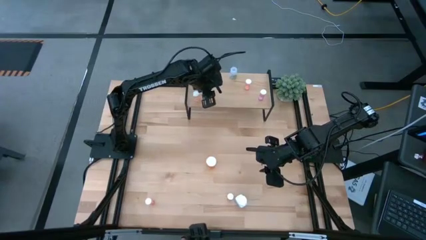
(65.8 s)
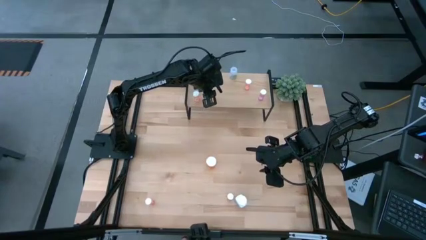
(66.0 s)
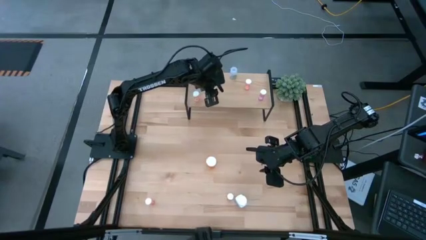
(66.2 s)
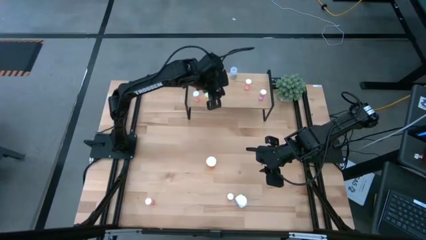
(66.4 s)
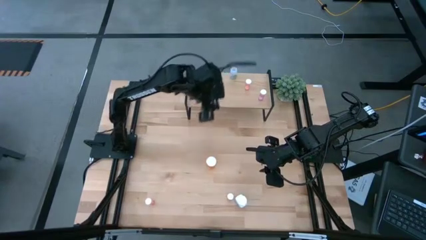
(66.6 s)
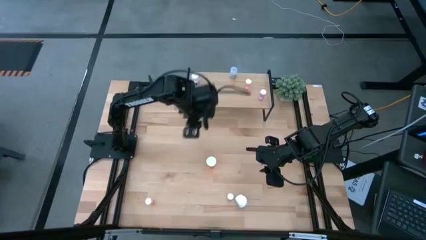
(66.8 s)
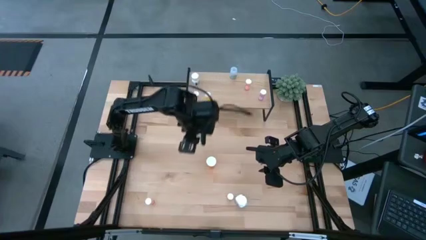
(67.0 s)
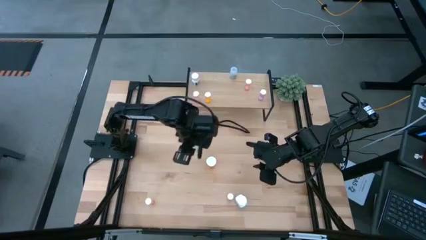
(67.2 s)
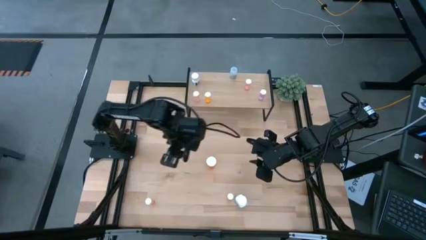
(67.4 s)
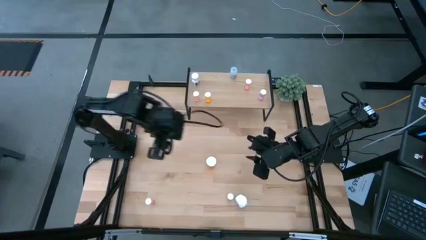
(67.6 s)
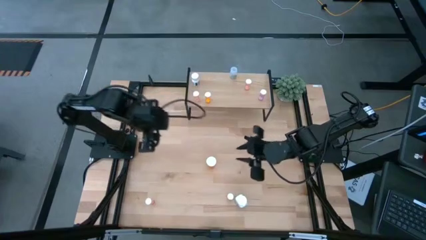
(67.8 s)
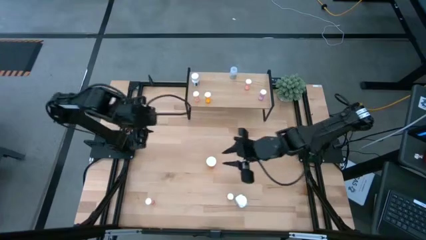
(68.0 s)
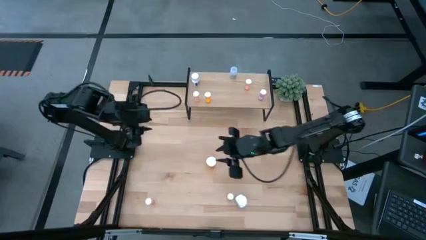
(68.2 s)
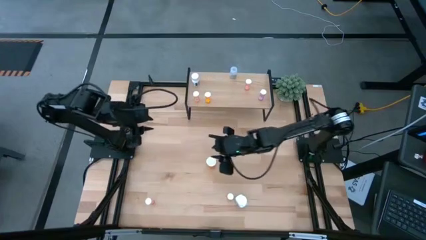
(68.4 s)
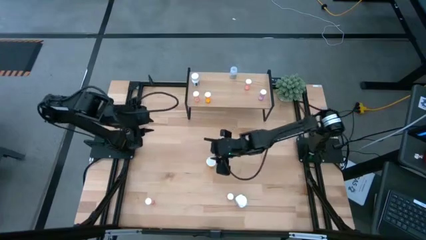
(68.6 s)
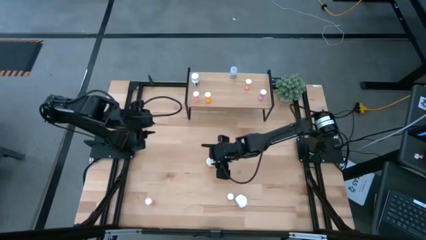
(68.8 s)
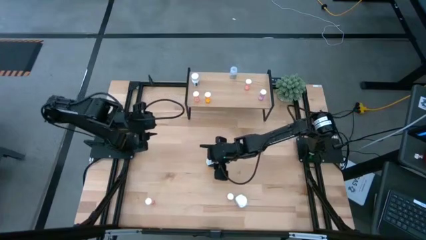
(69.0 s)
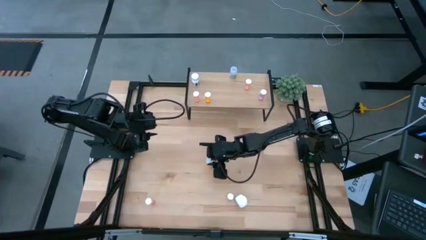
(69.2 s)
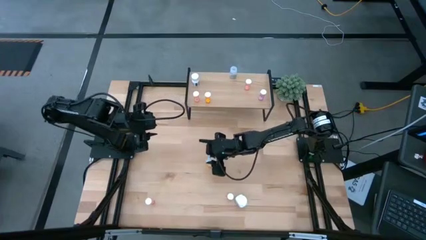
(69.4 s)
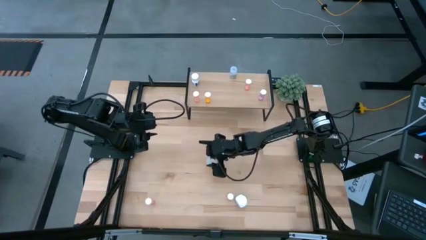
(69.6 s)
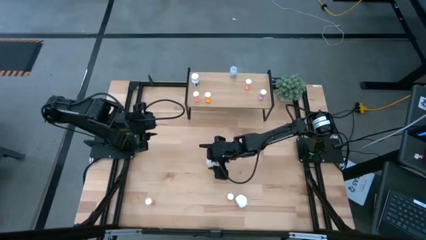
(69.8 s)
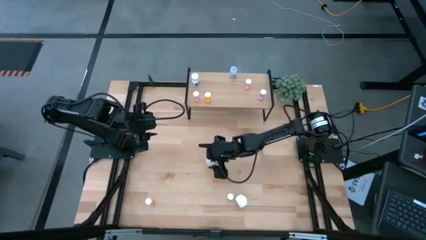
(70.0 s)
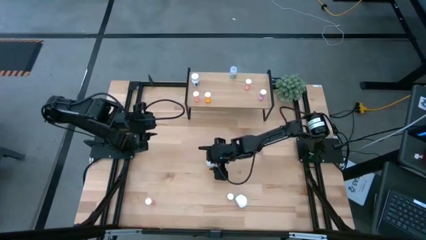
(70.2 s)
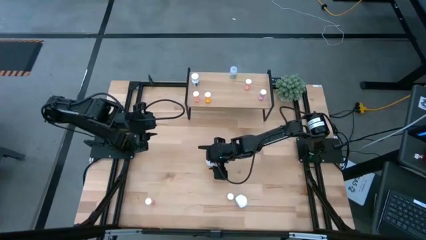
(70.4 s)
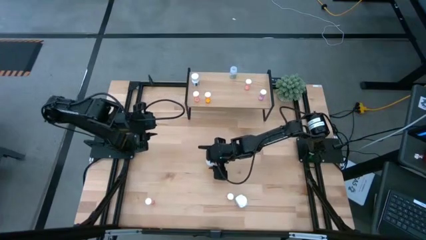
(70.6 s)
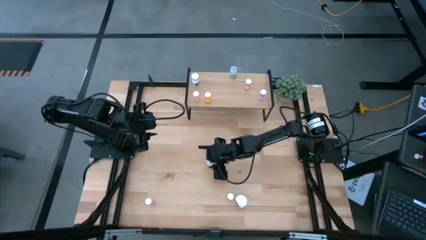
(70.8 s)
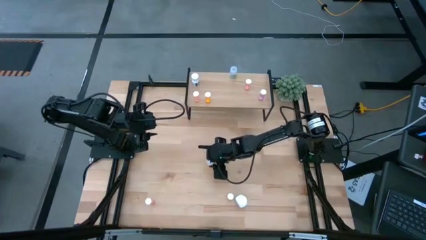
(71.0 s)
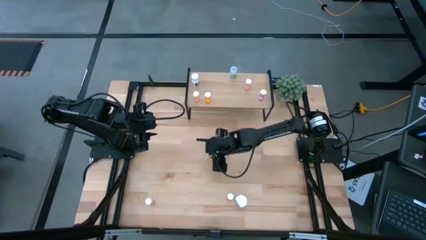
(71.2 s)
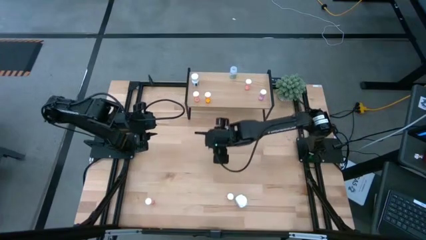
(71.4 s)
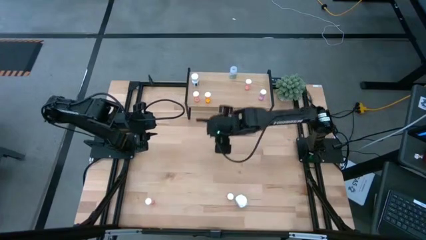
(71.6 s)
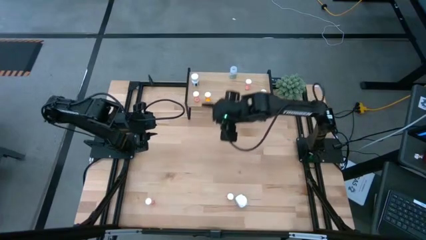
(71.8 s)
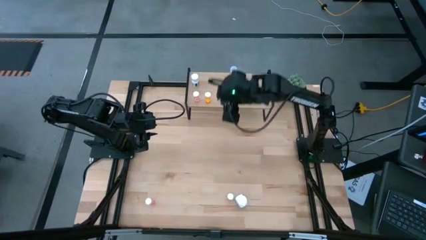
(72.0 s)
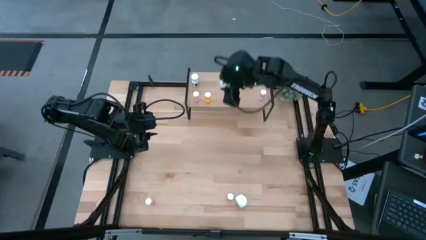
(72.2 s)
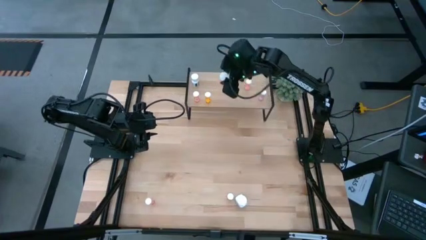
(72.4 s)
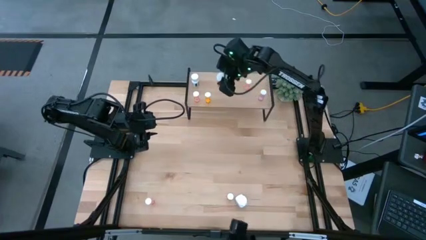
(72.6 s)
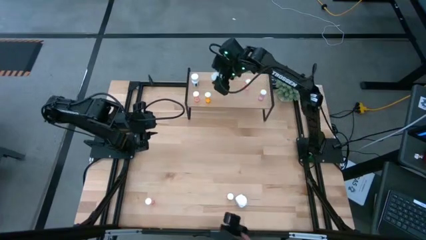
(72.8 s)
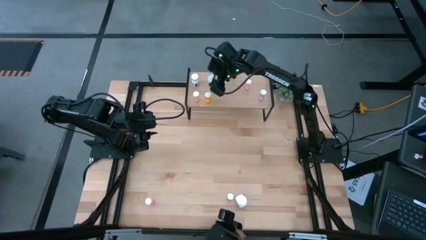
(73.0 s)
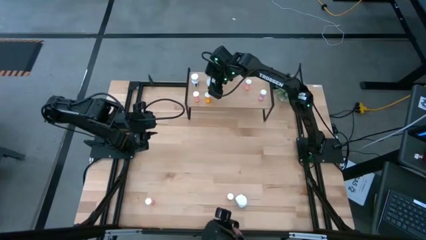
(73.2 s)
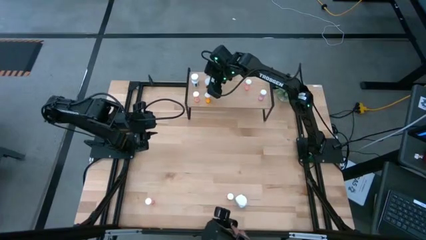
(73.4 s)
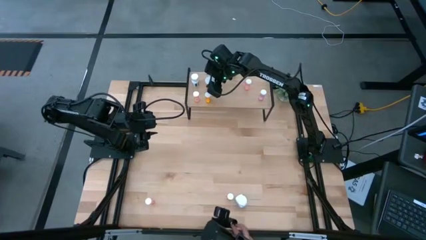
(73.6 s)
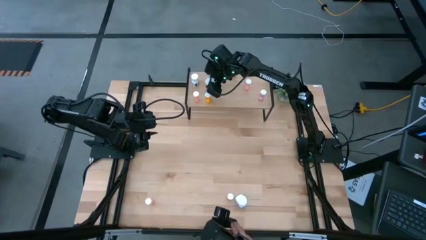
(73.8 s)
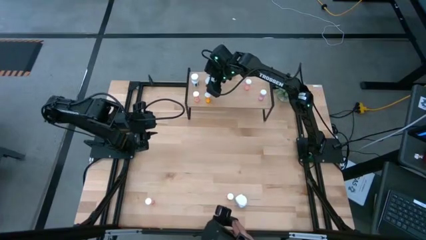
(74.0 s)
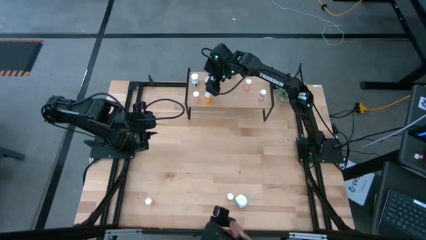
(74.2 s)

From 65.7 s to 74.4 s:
Task: Pick and place medicine bottles onto shelf by color
Put the orange pill bottle on the shelf
